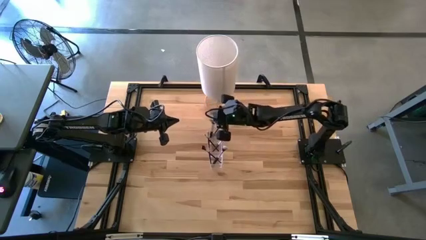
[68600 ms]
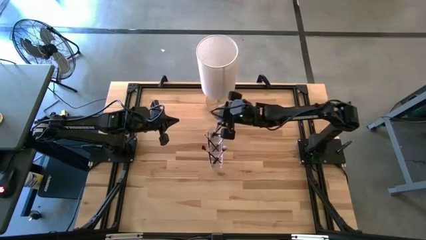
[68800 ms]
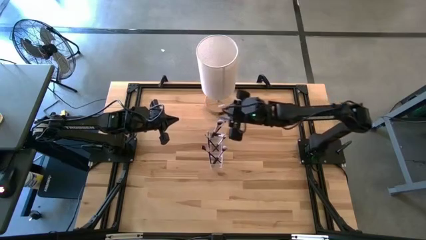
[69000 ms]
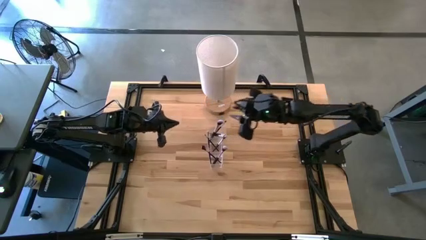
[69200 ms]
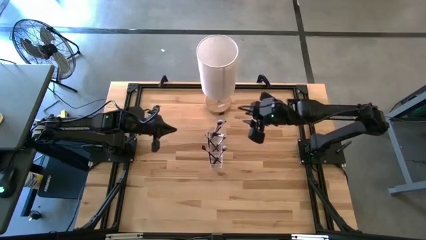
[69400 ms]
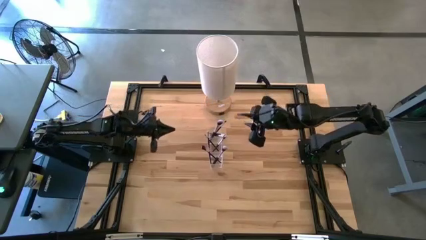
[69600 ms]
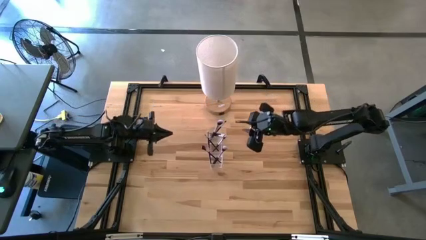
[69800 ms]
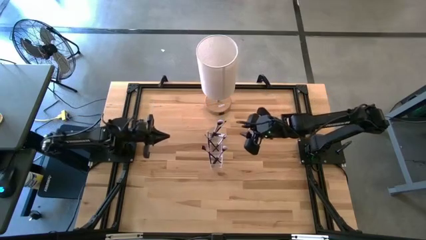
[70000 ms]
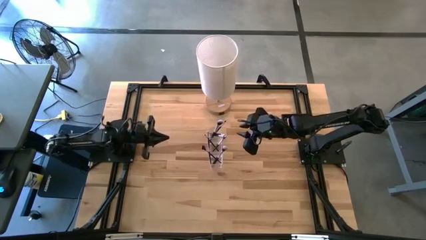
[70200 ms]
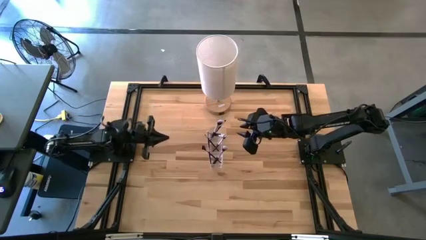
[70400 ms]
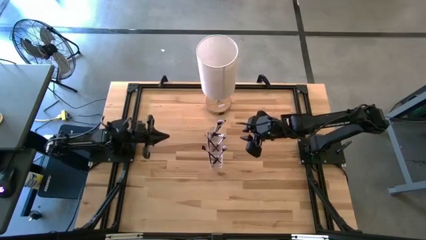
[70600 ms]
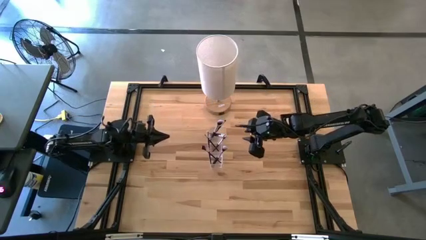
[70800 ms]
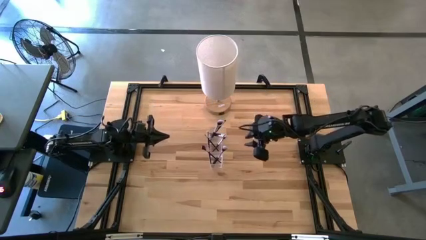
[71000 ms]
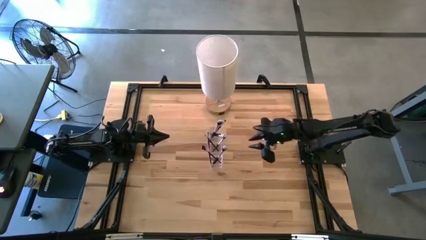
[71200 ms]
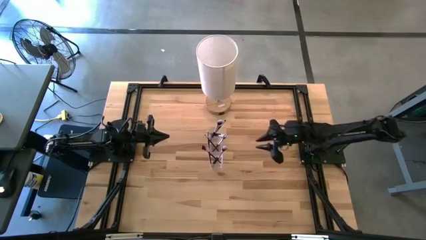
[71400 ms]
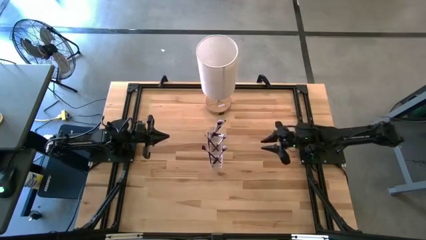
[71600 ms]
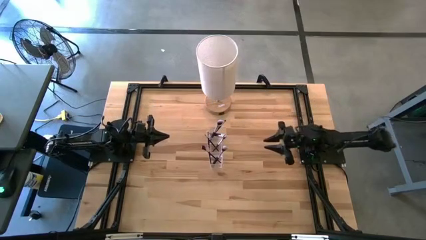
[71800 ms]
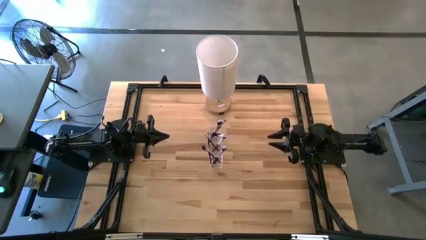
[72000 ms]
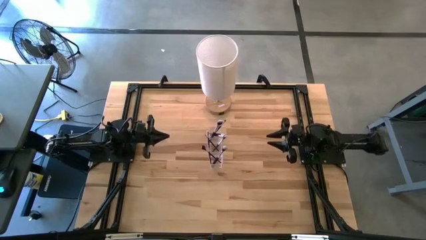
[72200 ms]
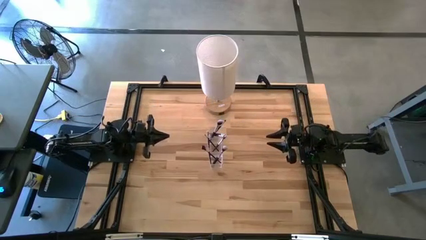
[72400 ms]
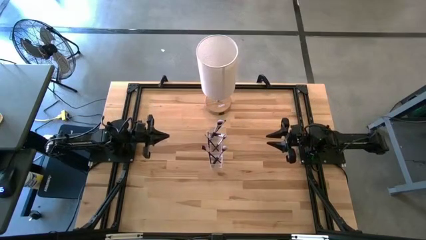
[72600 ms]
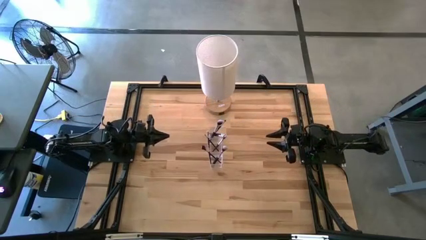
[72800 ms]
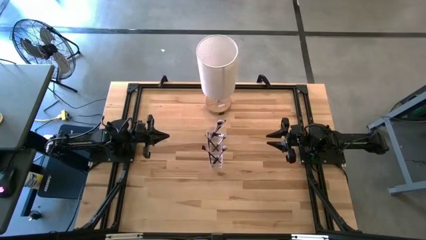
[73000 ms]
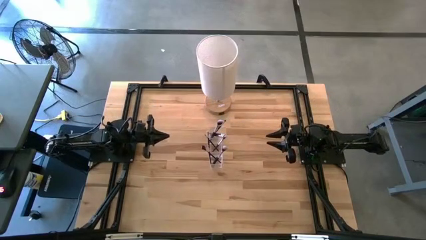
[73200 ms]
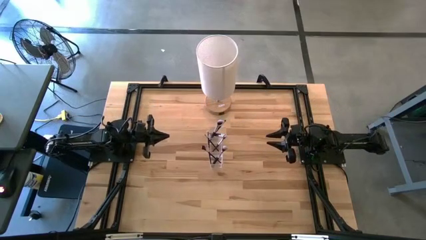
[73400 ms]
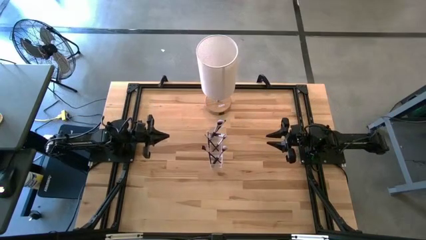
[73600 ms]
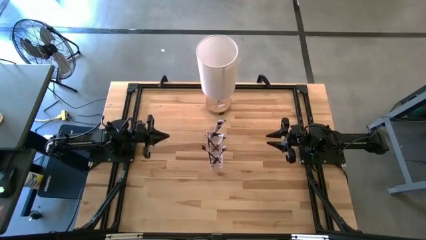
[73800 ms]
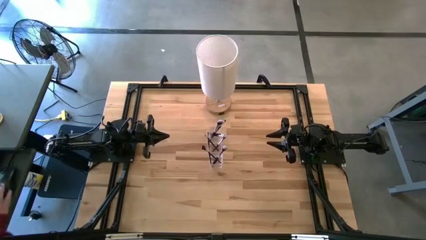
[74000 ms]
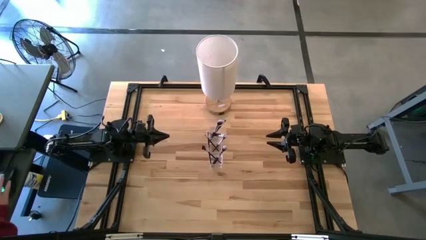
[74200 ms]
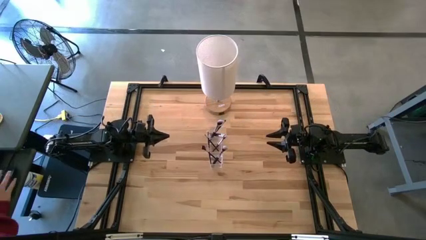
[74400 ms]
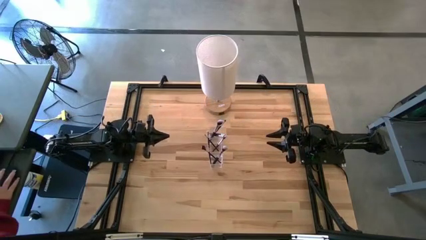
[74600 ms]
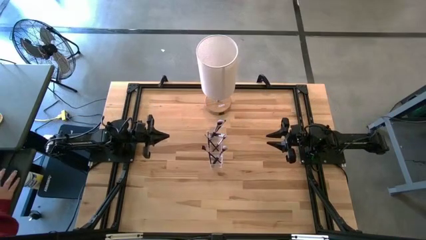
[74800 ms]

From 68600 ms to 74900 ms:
Task: Put items in baskets/containers
Return to Home Position

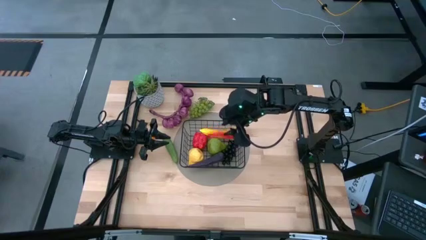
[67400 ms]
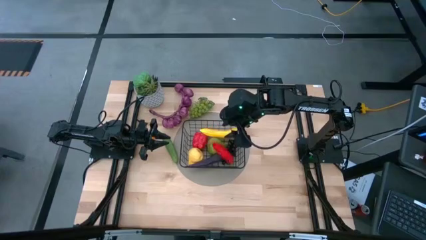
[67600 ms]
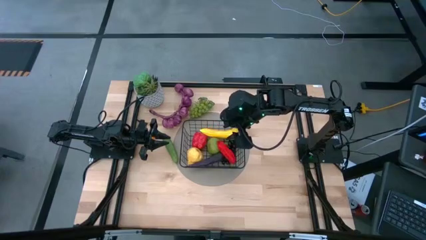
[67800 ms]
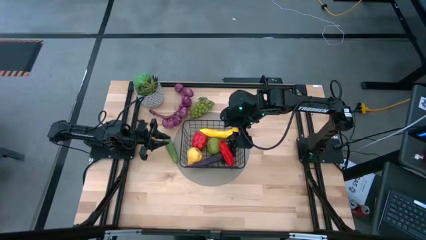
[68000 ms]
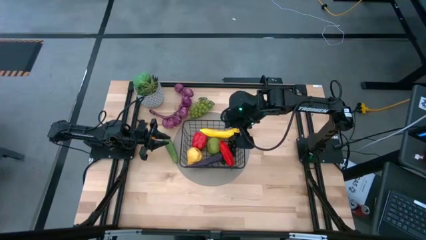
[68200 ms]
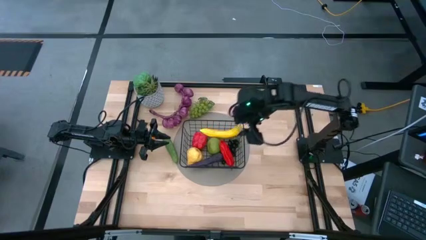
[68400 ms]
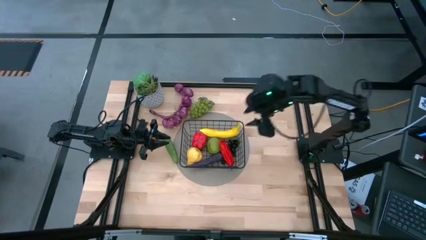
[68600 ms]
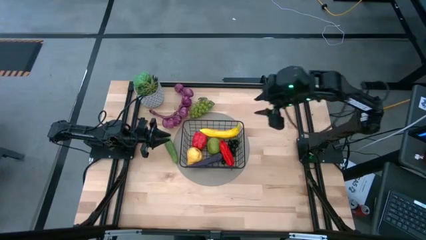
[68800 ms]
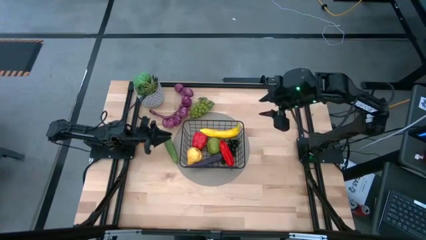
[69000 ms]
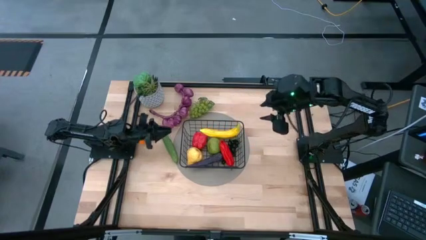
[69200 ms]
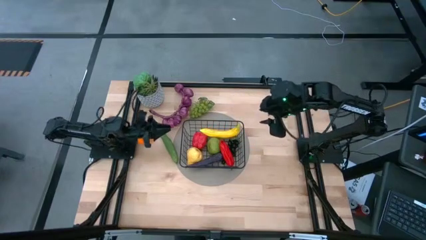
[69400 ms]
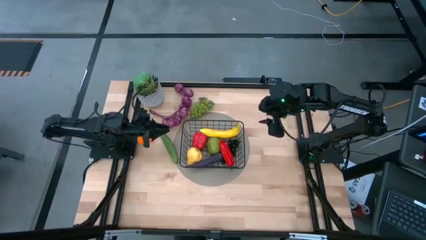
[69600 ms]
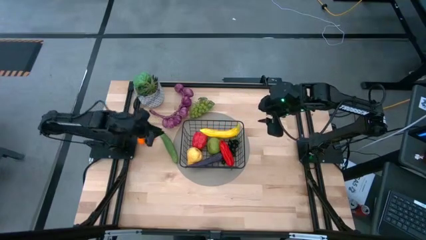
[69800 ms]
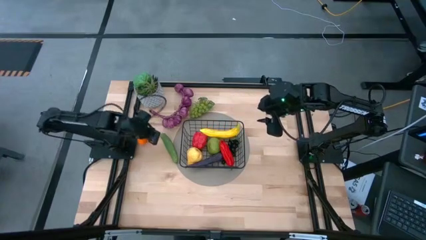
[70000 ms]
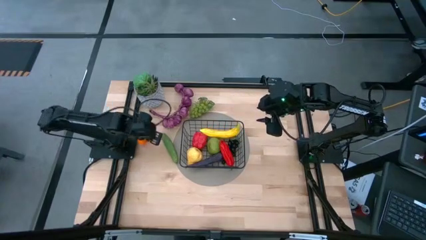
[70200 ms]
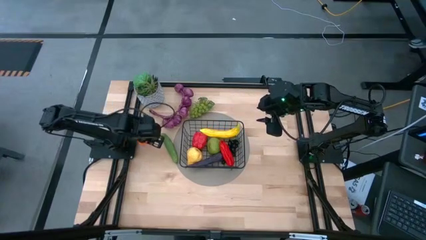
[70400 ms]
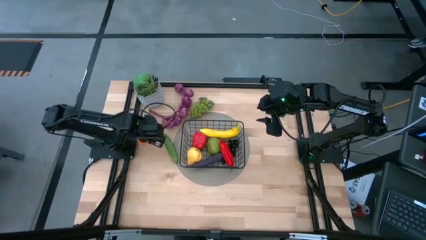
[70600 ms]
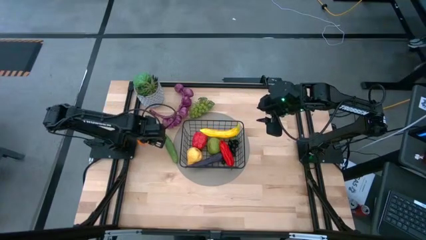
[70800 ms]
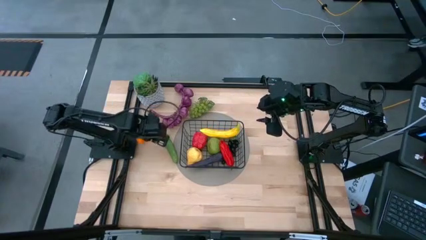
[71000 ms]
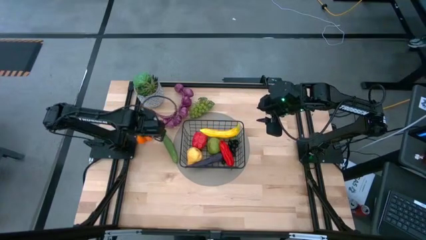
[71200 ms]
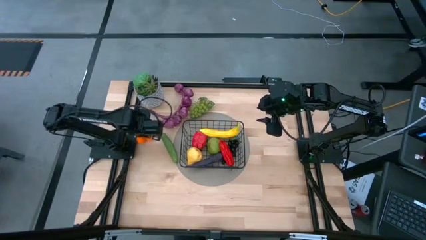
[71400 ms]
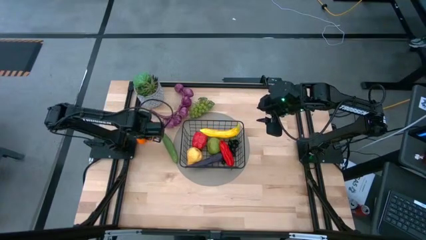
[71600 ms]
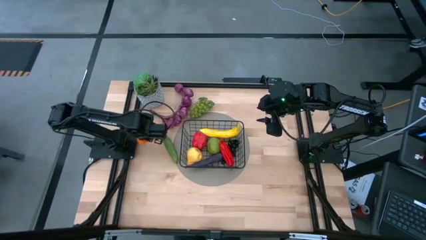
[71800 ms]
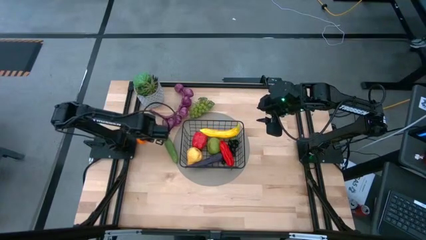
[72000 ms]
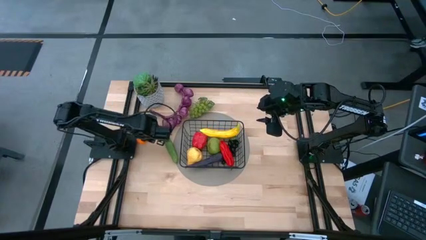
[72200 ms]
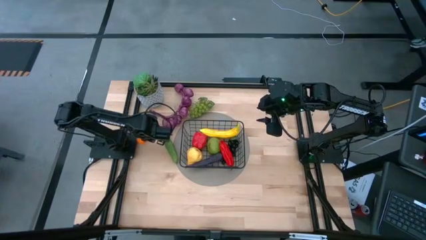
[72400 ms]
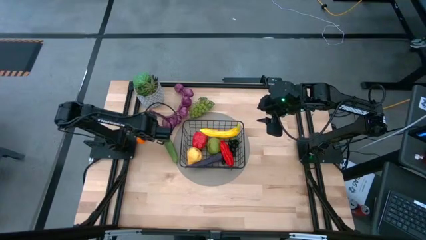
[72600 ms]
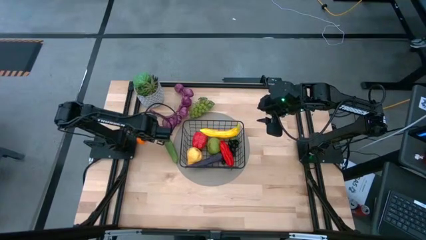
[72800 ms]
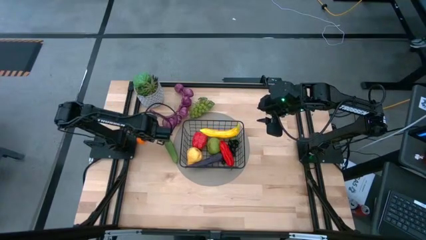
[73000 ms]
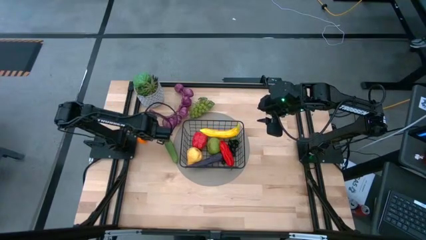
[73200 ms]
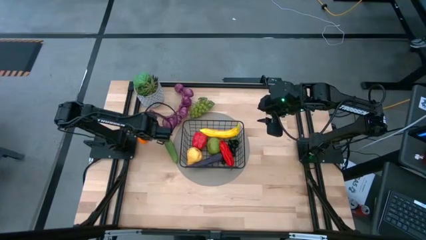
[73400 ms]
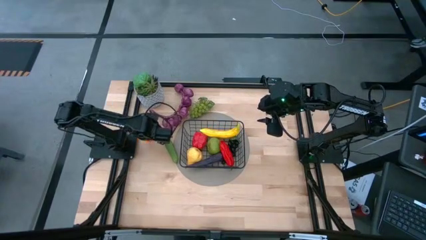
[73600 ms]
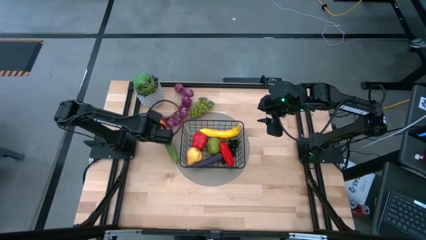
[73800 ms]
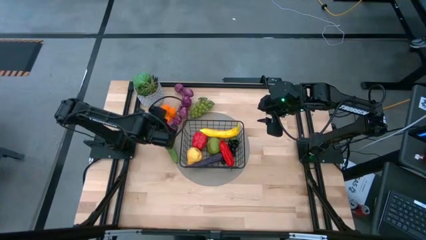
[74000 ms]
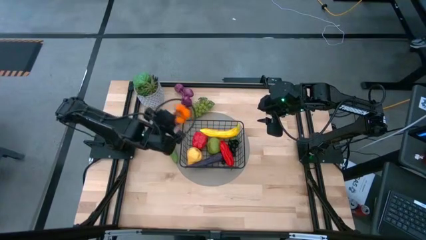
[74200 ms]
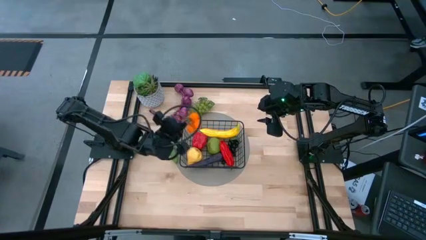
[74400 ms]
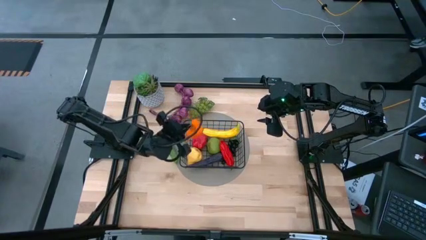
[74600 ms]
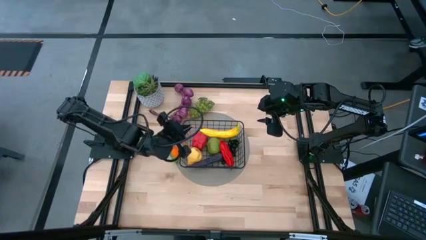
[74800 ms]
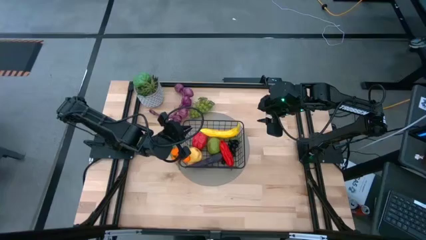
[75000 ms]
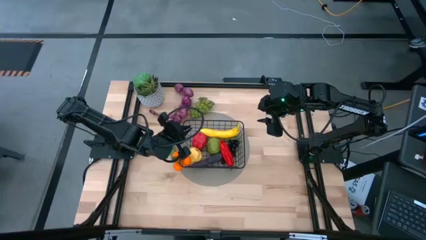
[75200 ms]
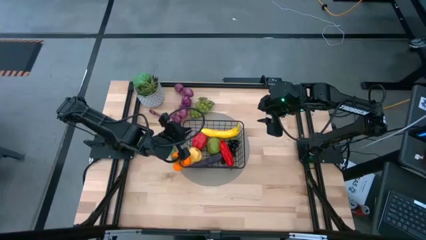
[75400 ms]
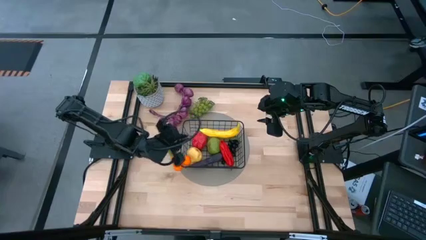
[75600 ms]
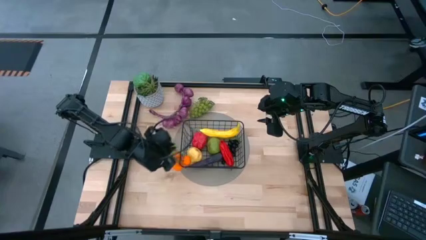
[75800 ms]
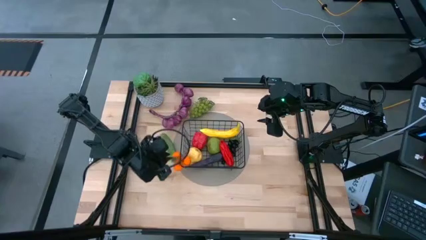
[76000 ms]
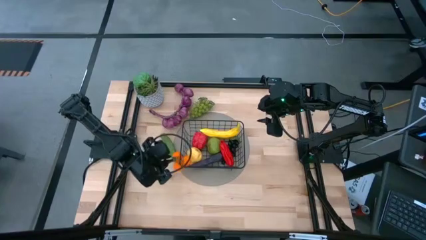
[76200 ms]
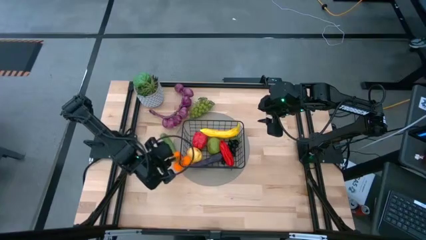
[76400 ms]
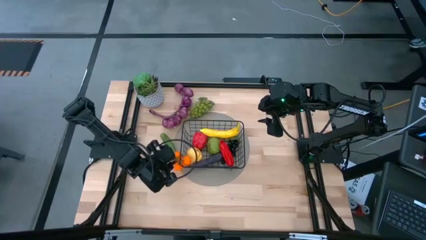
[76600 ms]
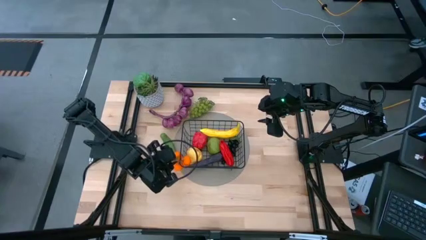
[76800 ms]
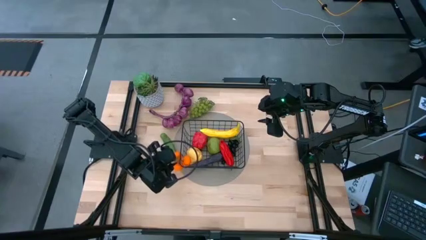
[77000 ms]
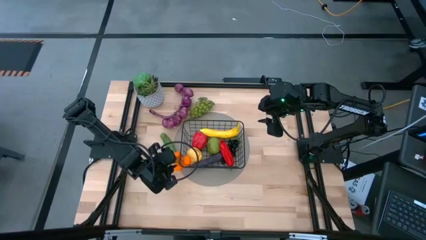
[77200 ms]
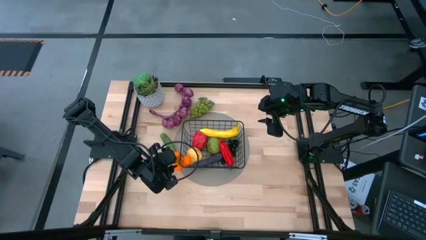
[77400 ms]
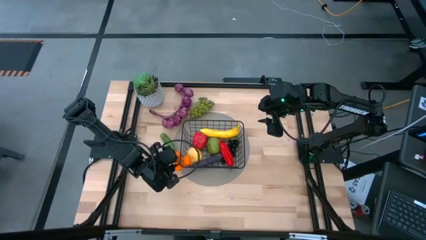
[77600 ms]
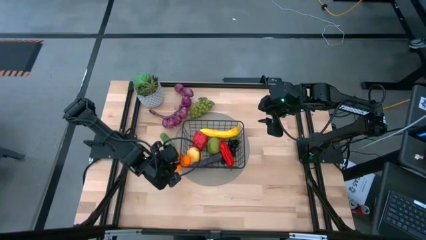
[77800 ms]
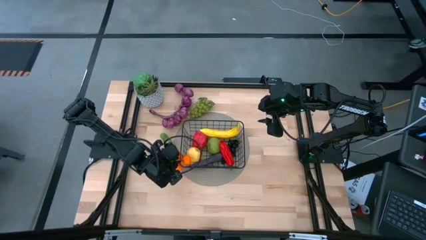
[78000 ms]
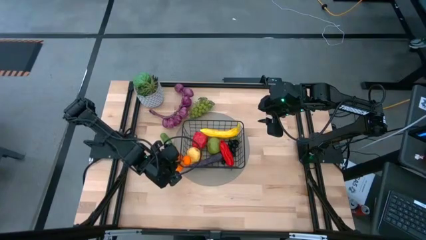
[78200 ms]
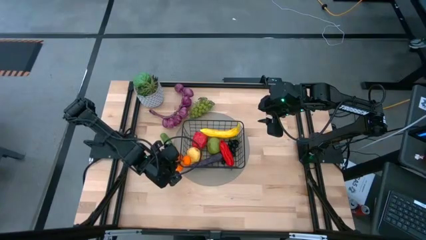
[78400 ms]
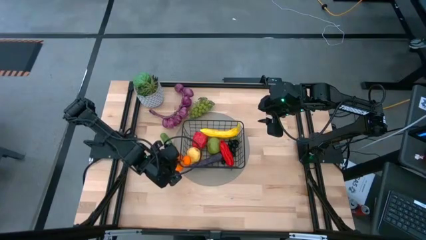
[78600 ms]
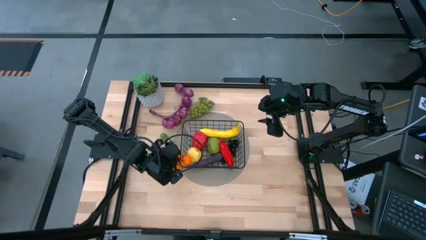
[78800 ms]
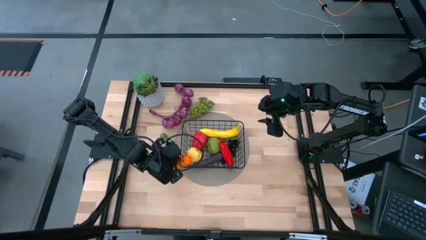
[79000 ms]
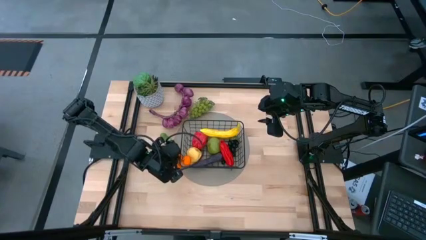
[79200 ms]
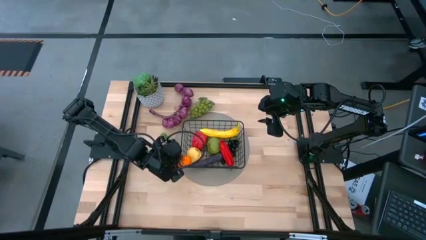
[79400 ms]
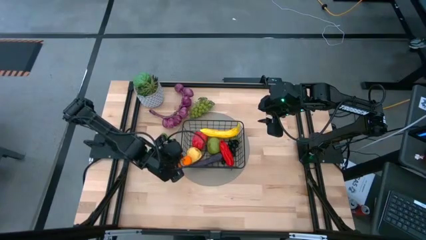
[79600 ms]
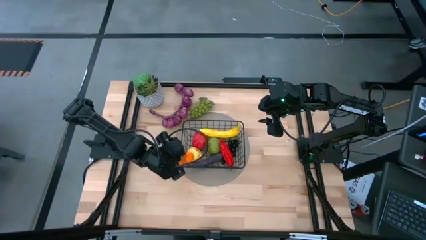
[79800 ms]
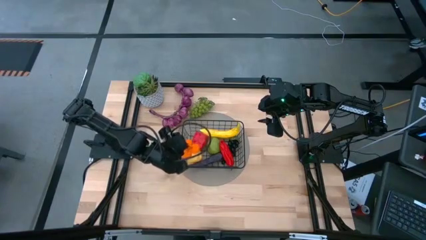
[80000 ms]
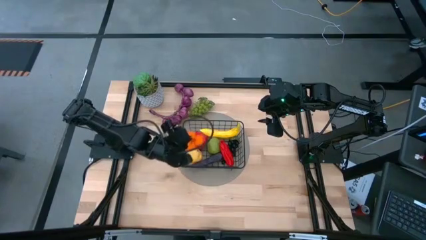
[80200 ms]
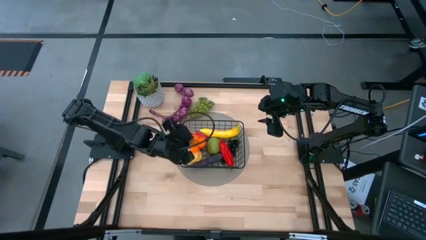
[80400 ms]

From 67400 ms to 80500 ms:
Task: Build produce basket
Put the orange tangerines into the black wire basket
